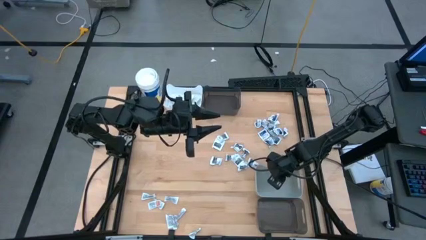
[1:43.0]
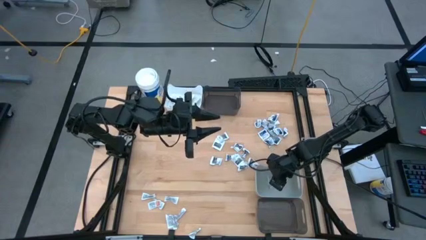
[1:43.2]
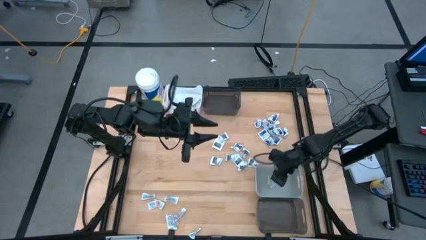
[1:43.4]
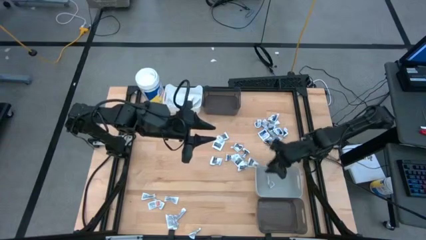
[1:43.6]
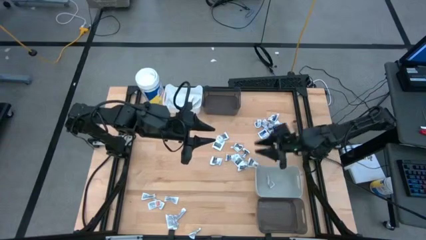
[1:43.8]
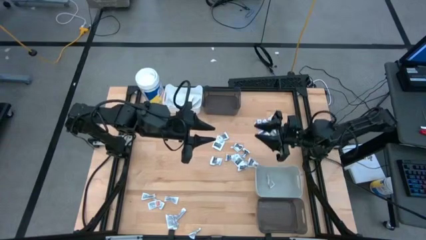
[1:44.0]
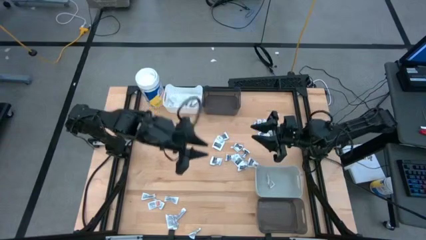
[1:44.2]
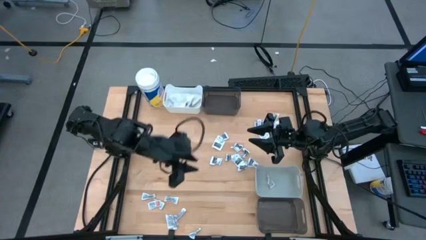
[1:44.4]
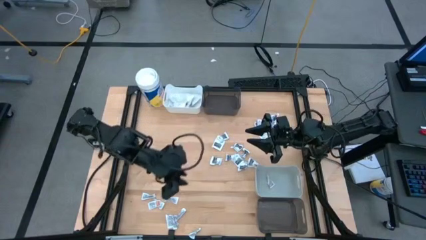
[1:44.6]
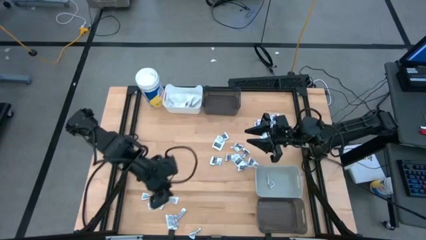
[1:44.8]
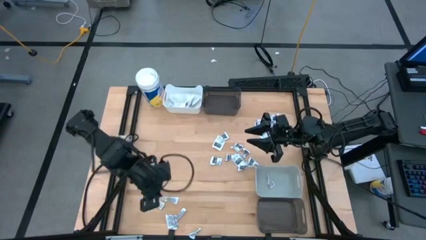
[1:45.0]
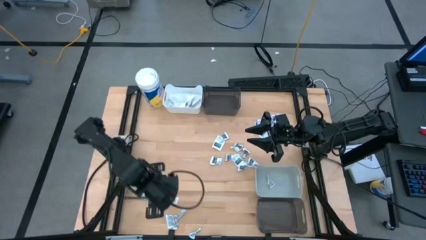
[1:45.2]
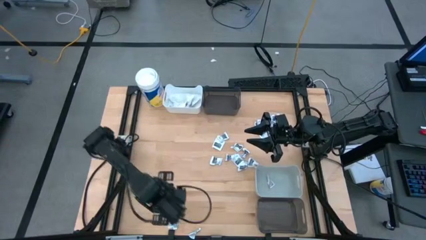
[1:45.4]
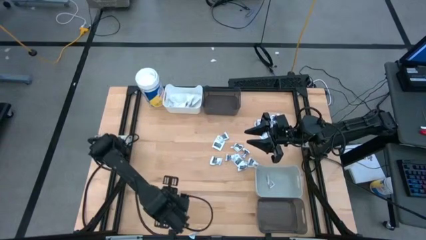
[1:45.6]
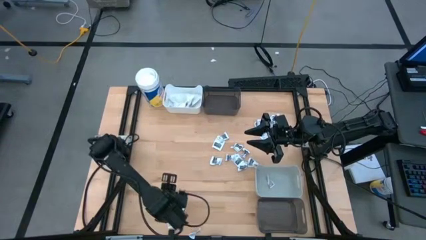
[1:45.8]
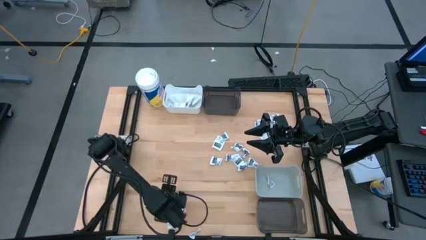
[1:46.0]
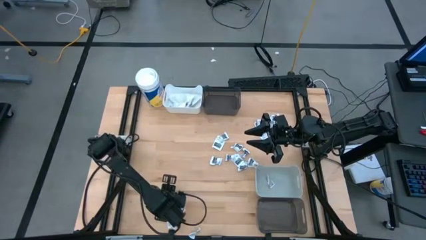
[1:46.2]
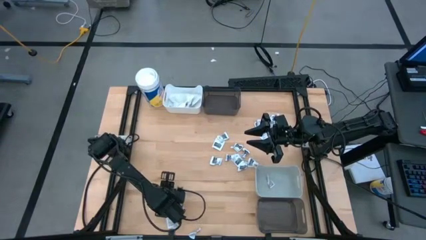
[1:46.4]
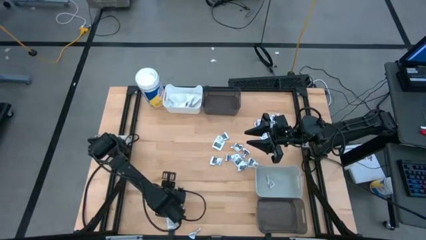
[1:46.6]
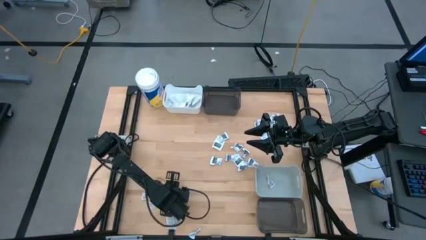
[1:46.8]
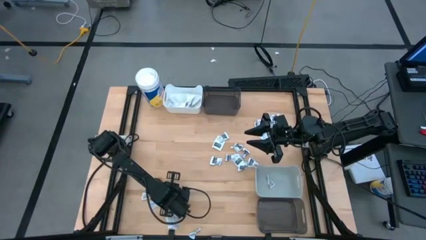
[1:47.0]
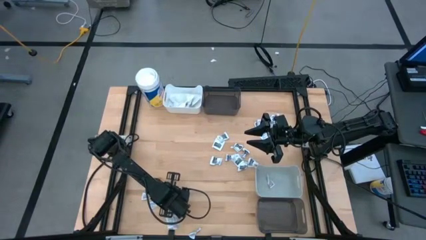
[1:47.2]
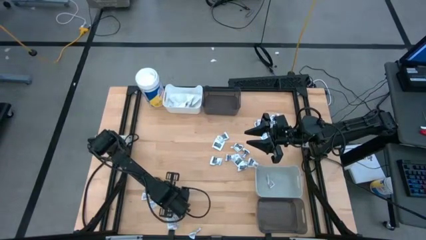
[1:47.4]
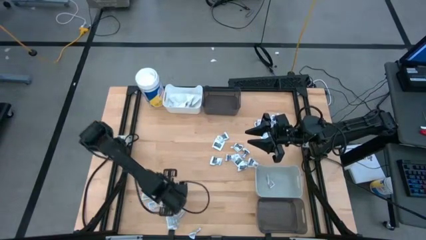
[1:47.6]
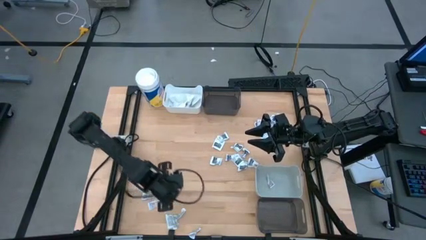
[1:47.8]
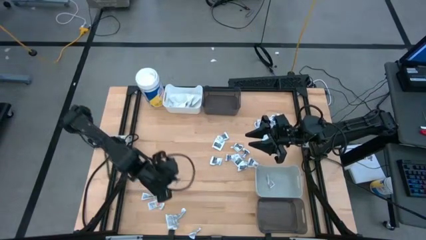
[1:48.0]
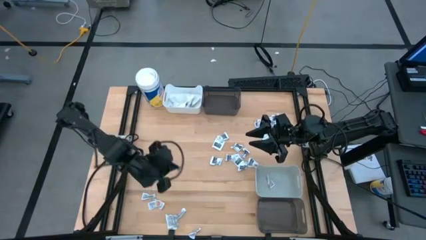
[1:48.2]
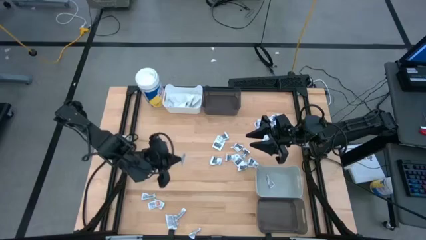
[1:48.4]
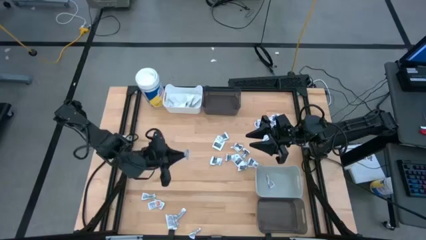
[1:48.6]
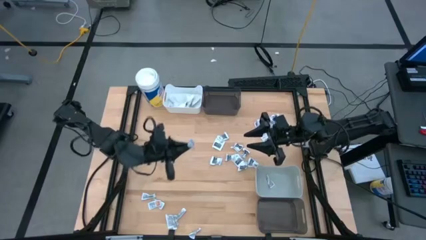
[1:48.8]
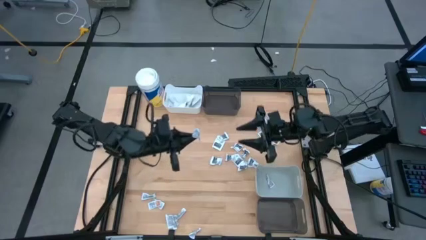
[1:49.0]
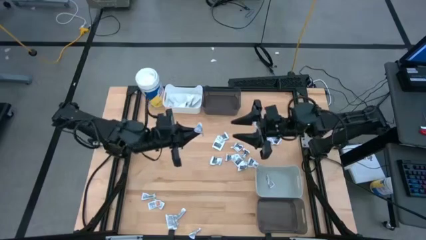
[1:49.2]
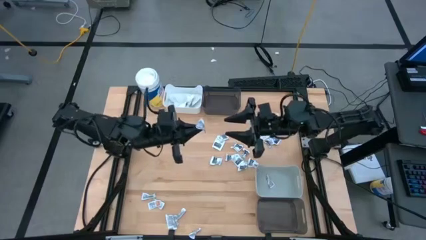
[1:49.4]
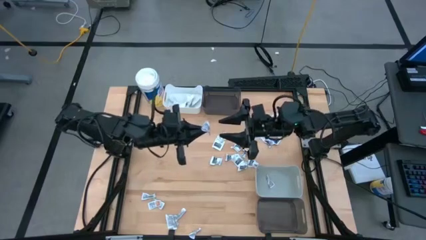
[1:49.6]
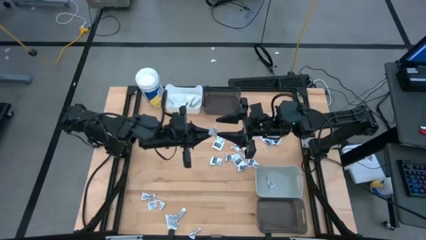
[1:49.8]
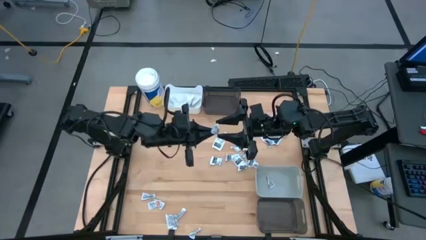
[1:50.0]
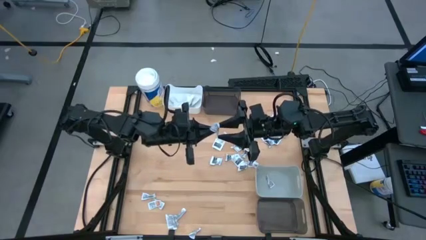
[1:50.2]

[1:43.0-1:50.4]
Task: Pick & Place First Aid Supplies
Put the orange ointment pack into the gray bin

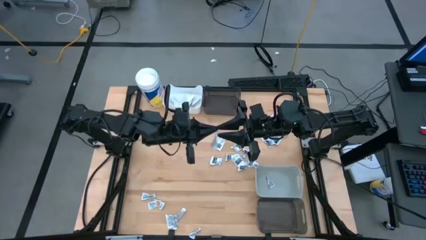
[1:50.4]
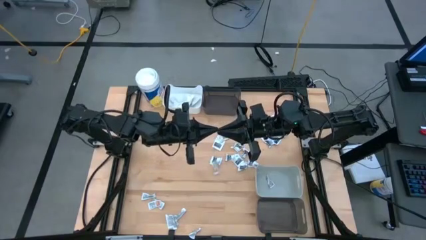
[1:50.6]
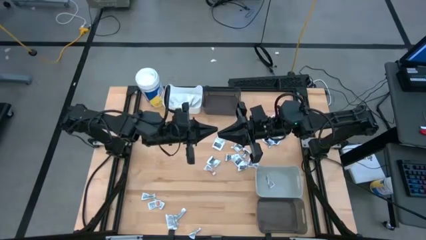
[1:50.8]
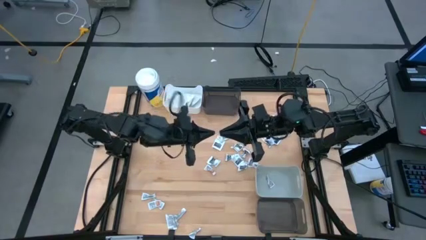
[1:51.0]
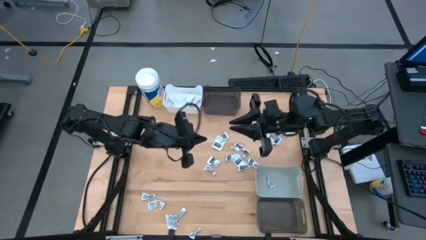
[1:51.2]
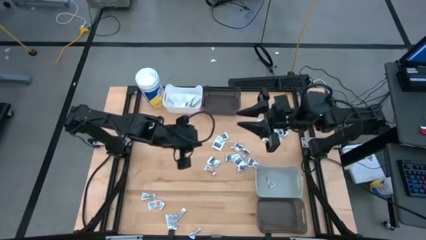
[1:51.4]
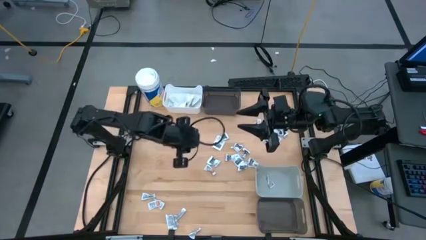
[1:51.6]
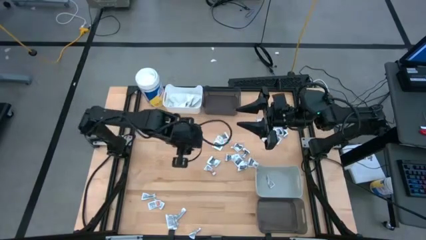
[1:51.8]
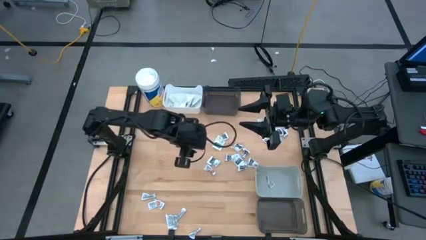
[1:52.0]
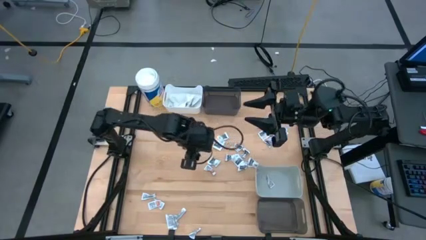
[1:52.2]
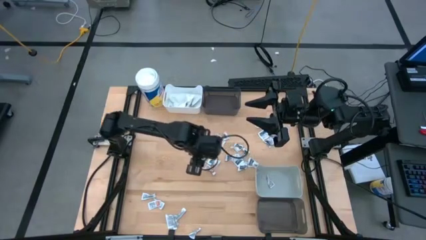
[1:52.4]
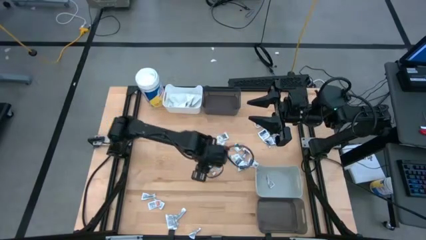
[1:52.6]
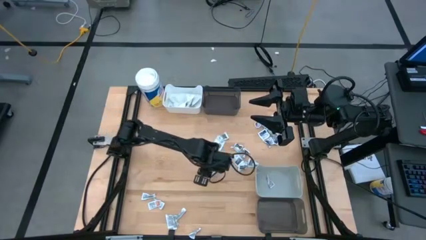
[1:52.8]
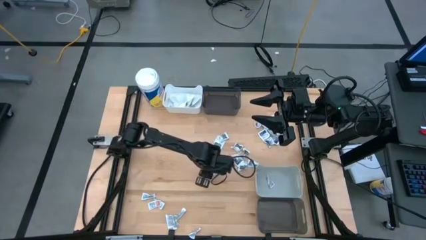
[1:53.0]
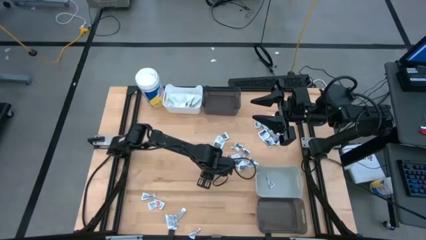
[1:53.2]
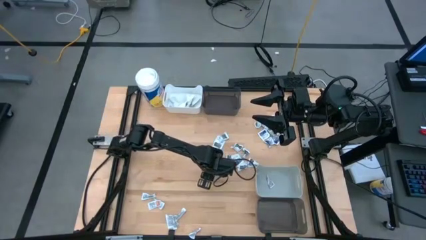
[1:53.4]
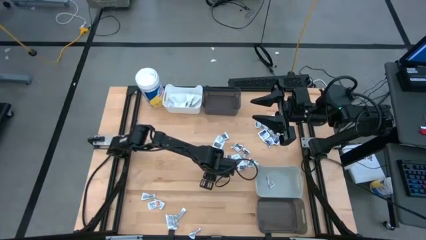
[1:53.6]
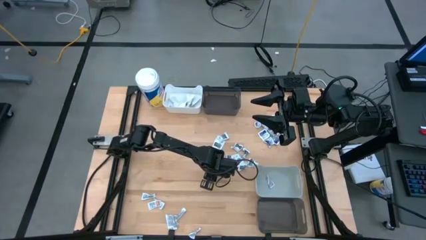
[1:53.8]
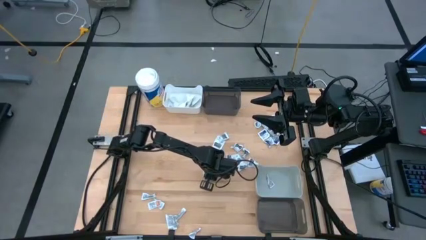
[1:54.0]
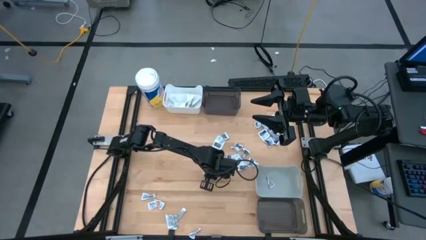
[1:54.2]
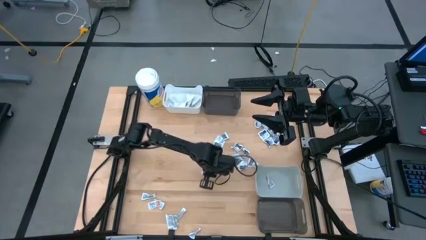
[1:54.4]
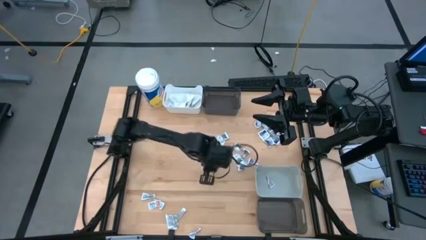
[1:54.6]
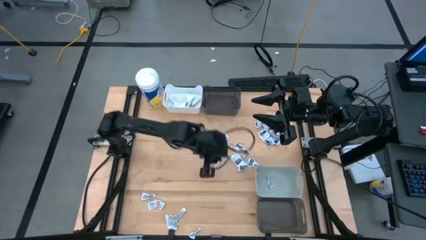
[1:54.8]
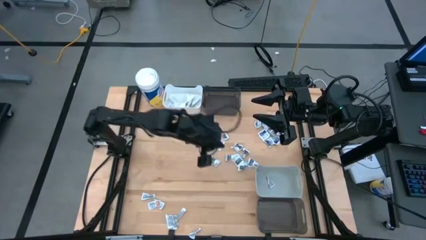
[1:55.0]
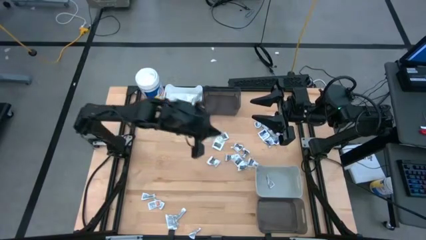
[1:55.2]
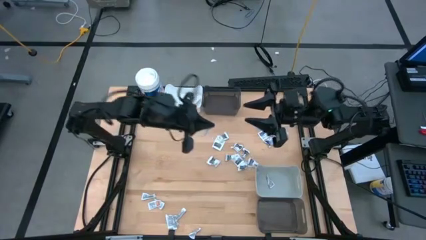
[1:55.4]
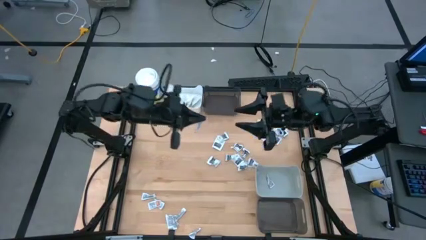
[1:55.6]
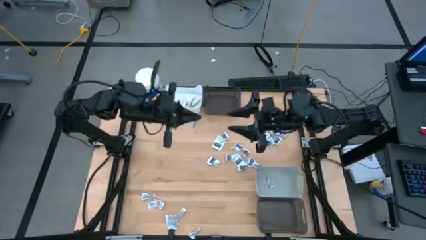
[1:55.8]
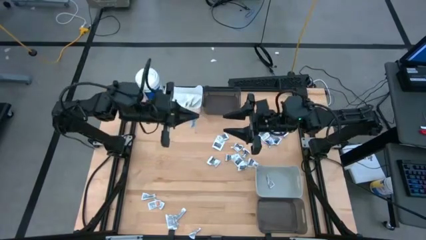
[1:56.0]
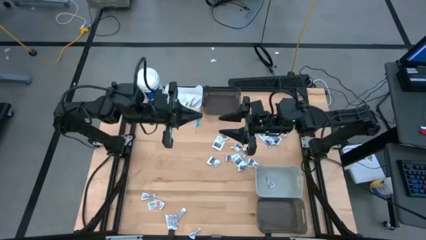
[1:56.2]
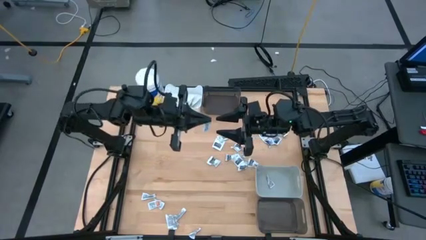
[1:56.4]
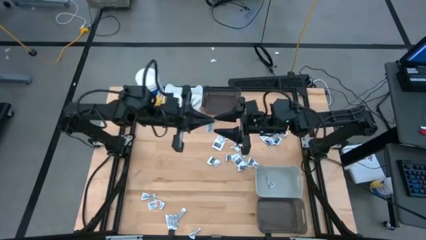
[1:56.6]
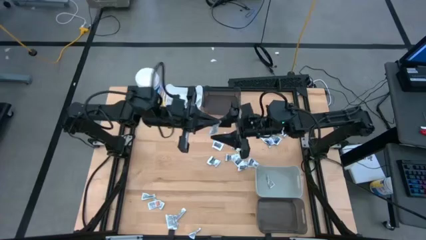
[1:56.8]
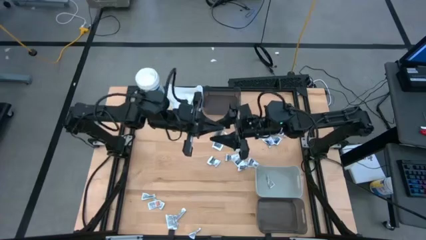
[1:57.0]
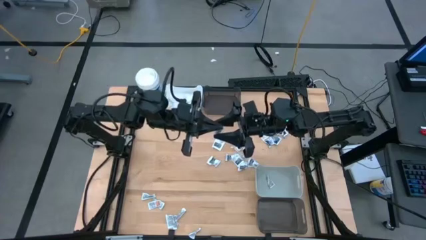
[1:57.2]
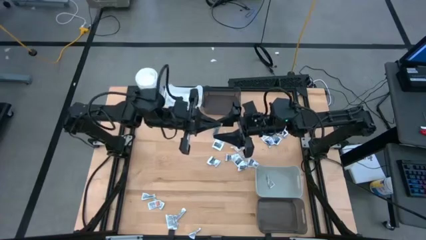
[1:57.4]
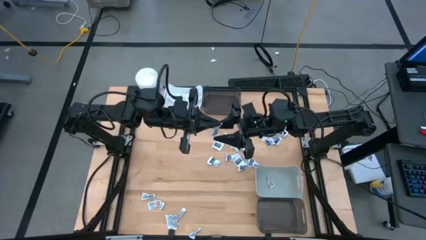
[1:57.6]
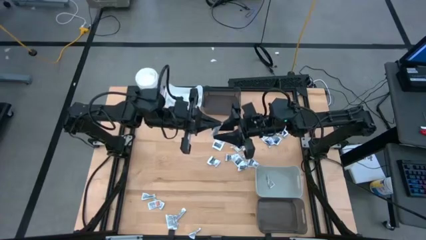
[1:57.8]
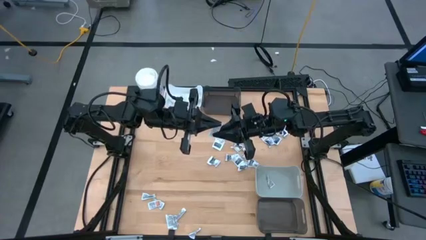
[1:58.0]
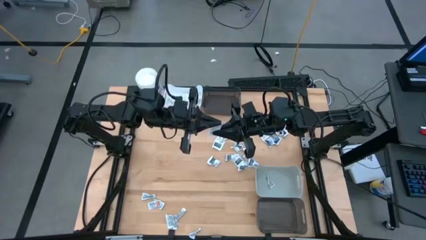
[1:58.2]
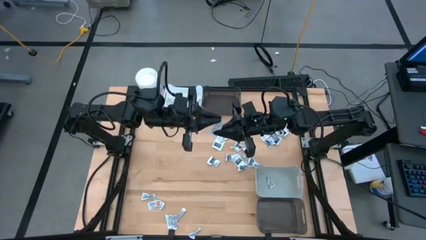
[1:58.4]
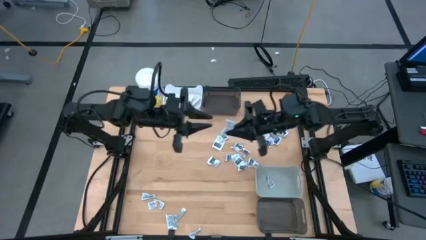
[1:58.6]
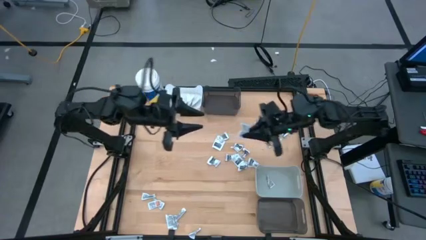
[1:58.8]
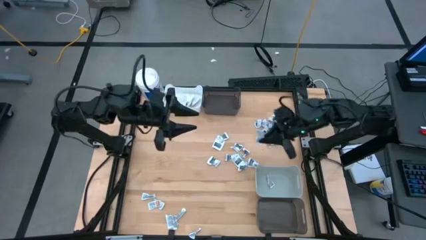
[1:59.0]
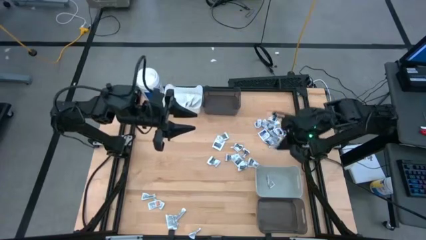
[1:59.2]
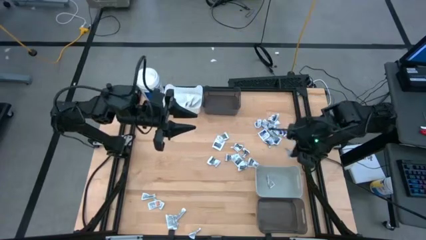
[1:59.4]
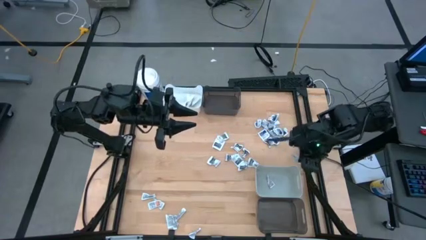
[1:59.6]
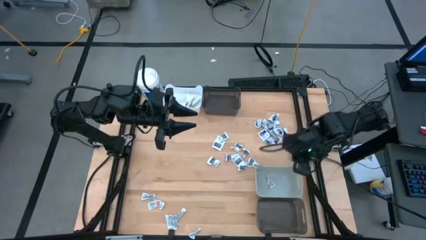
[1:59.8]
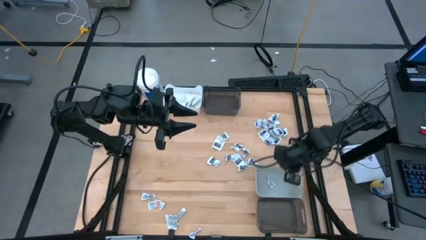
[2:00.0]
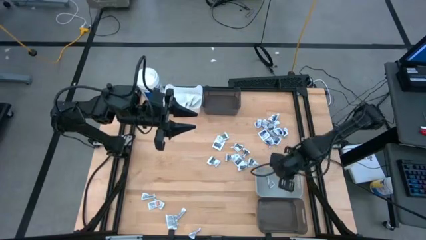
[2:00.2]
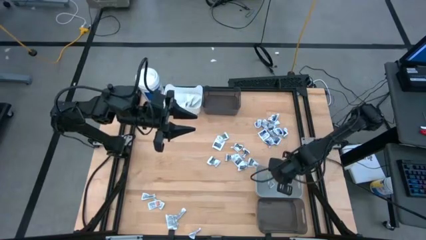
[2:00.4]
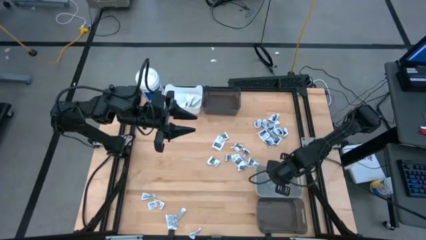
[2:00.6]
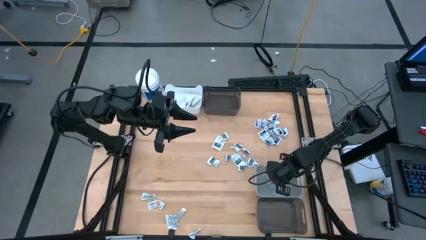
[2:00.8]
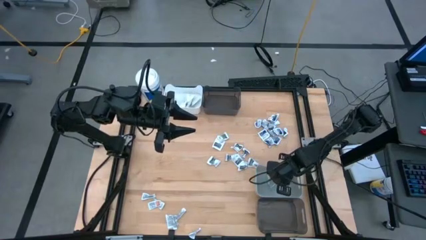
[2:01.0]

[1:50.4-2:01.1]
Put the orange ointment pack into the gray bin
